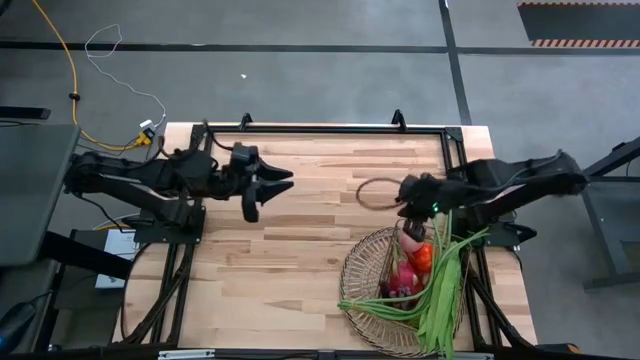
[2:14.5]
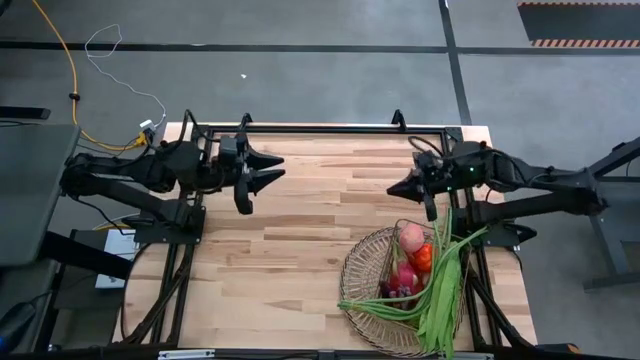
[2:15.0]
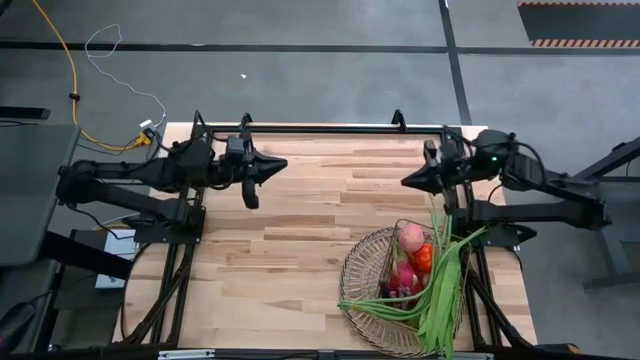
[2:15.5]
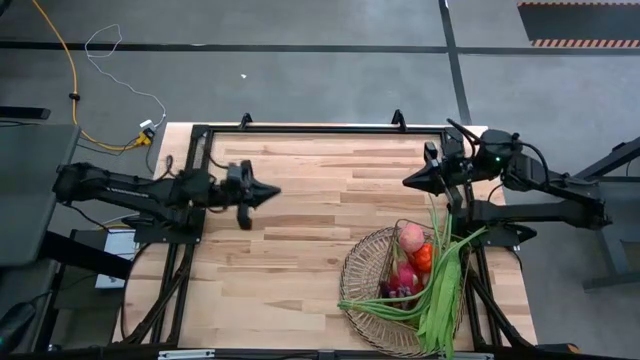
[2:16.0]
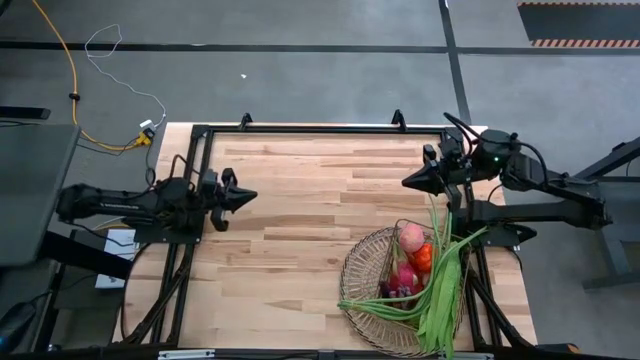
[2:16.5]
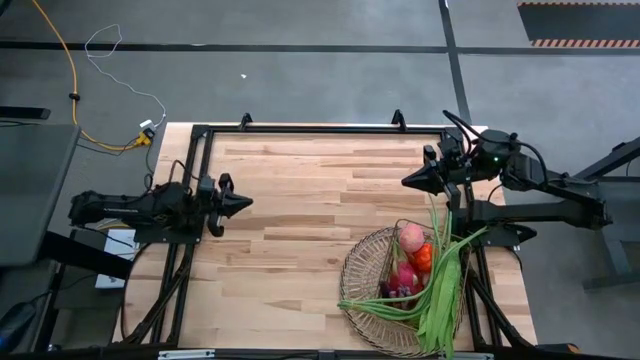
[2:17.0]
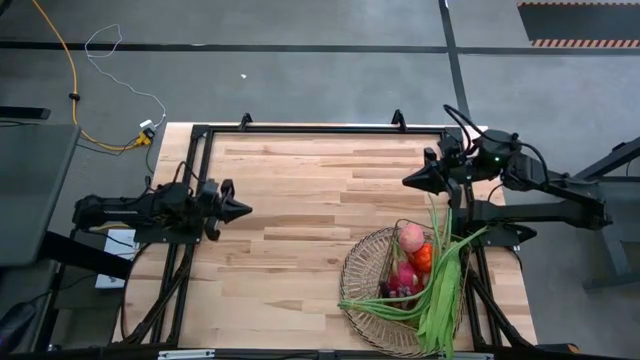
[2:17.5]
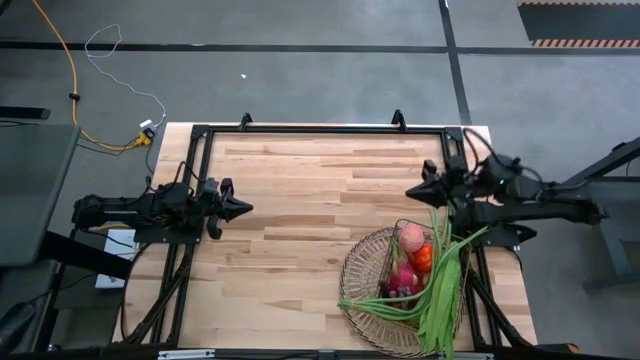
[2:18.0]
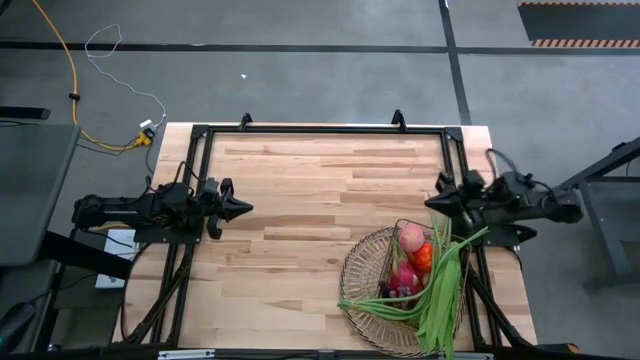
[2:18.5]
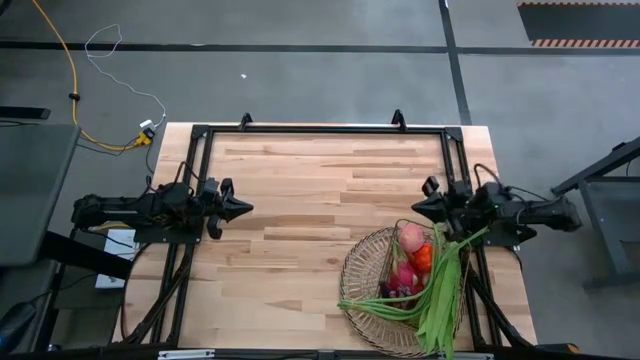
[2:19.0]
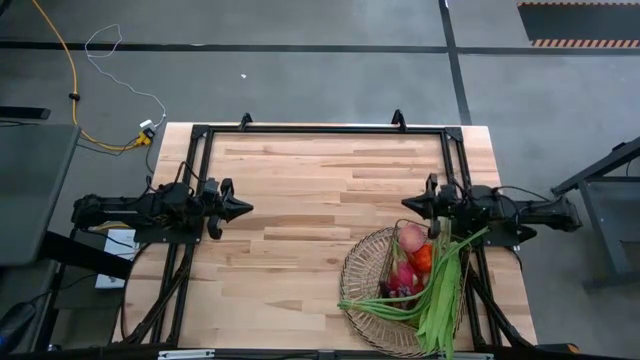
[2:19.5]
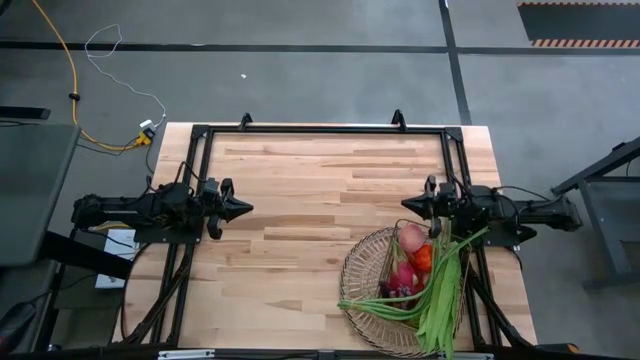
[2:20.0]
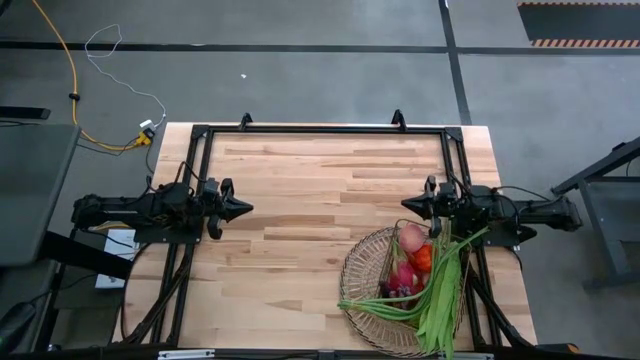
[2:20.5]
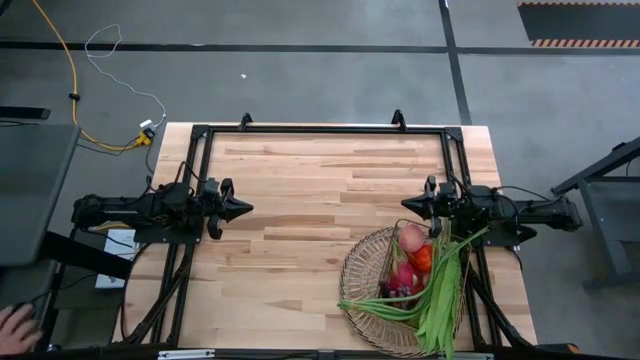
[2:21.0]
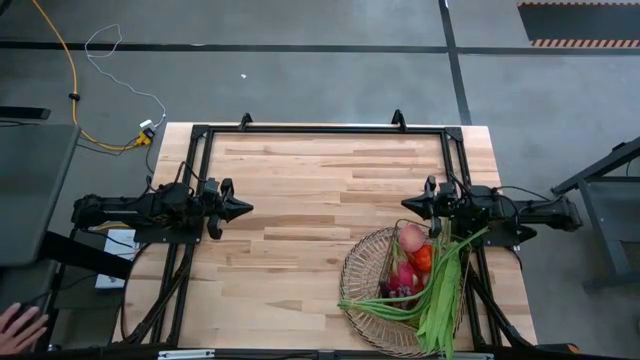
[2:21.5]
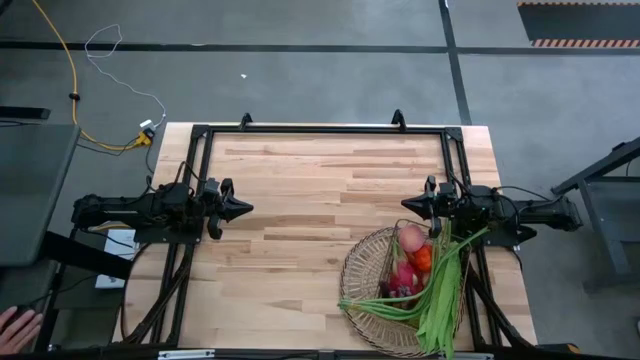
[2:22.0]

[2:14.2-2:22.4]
Task: Build produce basket
Return to Home Position

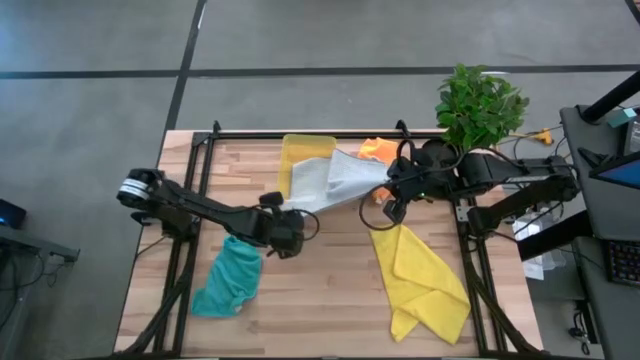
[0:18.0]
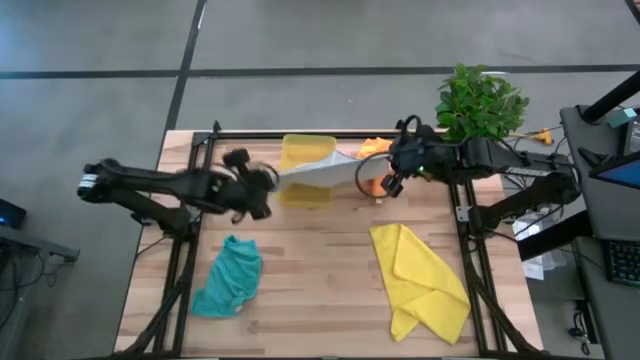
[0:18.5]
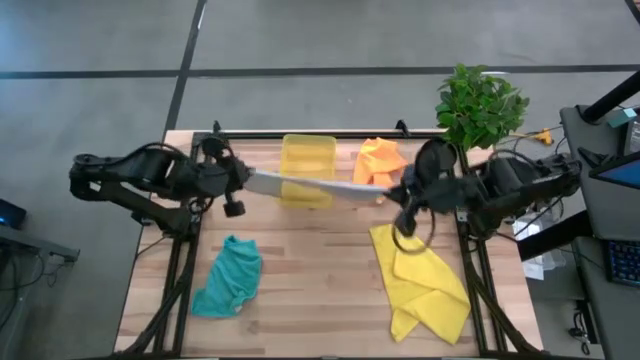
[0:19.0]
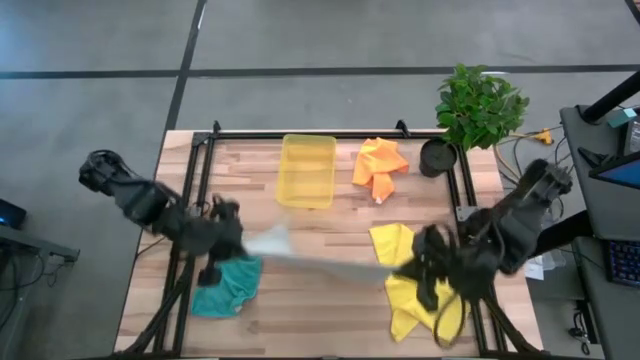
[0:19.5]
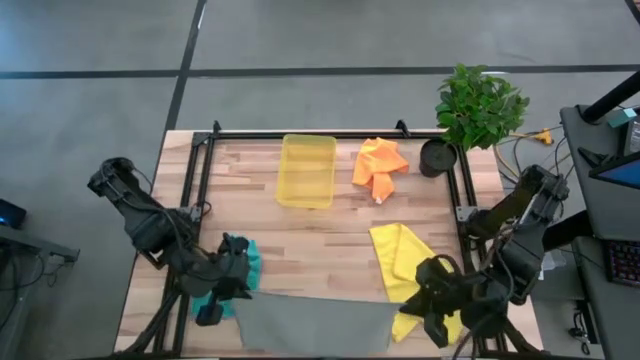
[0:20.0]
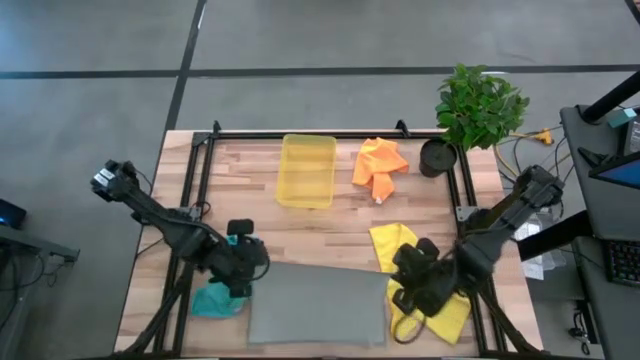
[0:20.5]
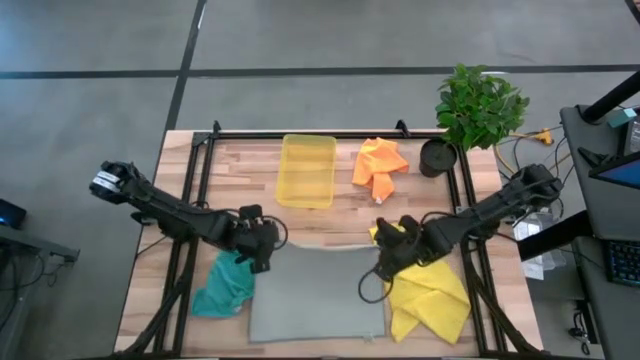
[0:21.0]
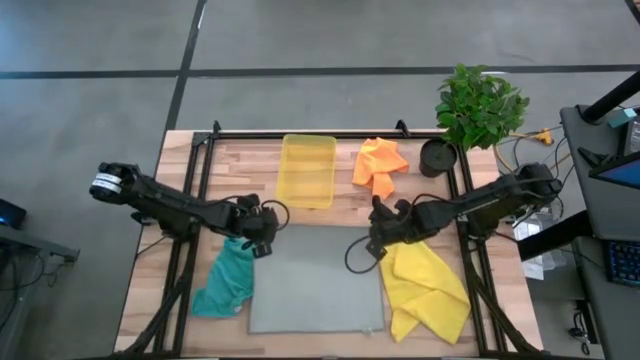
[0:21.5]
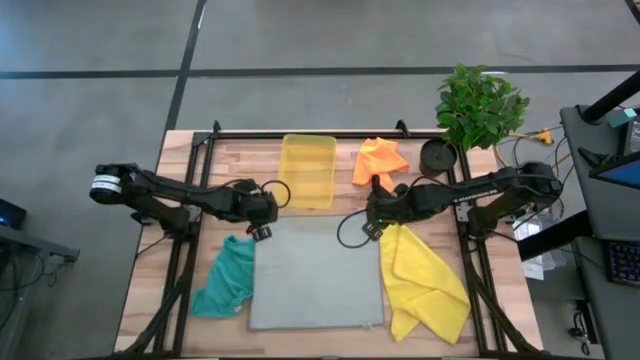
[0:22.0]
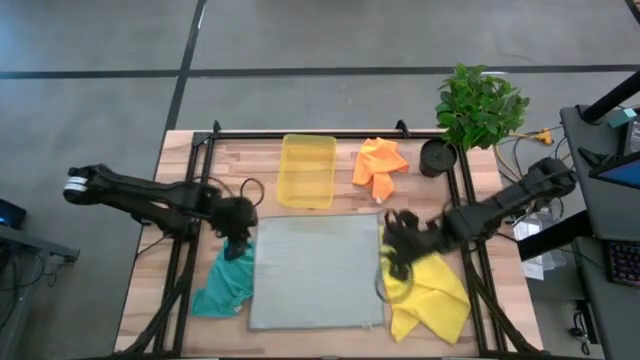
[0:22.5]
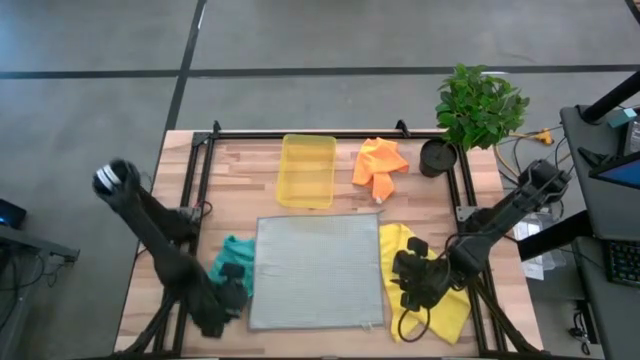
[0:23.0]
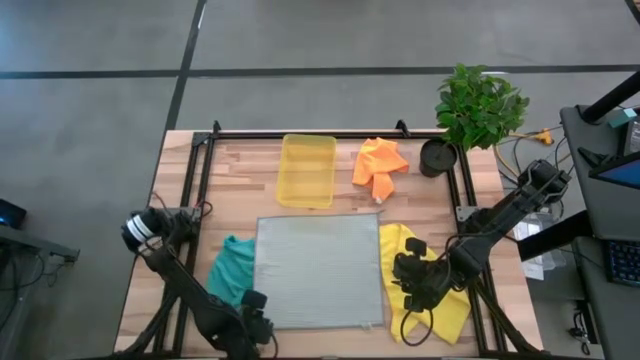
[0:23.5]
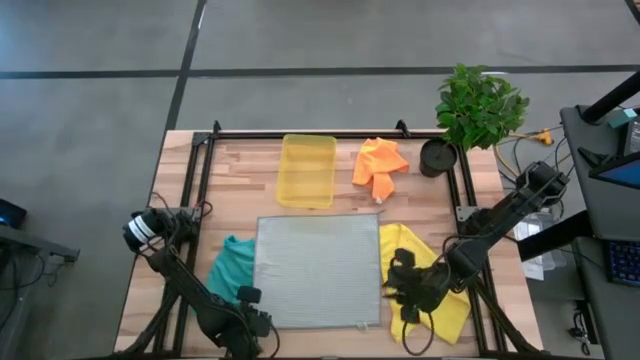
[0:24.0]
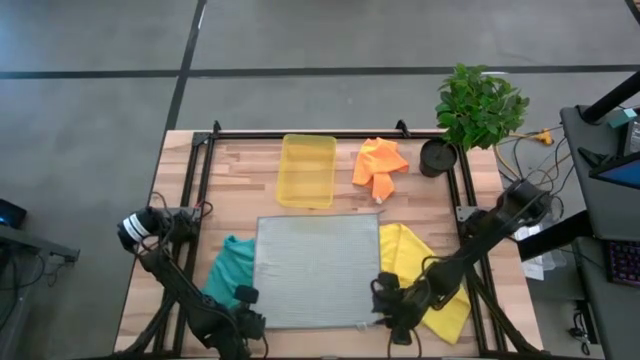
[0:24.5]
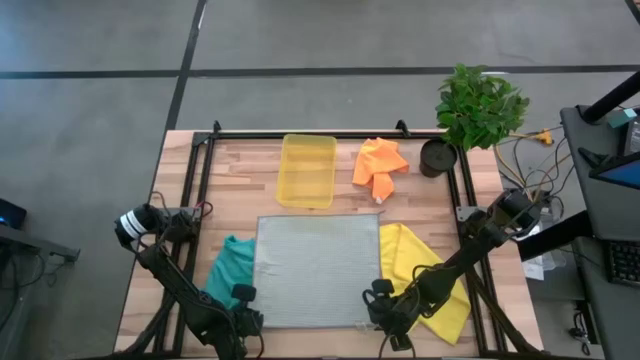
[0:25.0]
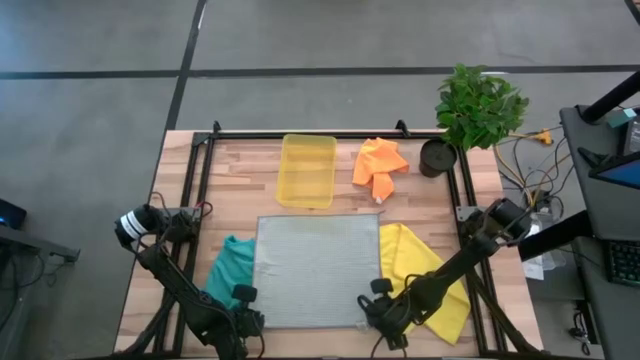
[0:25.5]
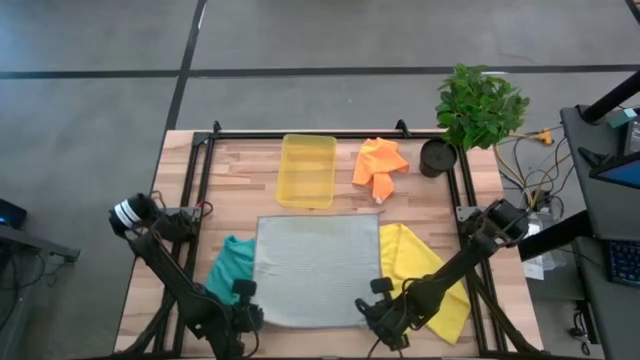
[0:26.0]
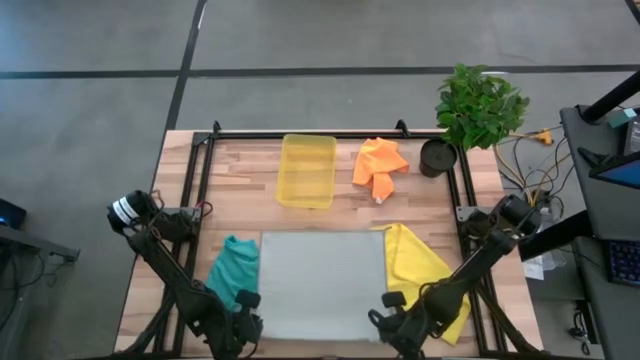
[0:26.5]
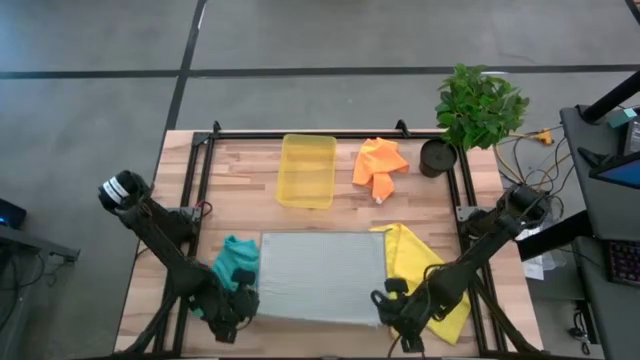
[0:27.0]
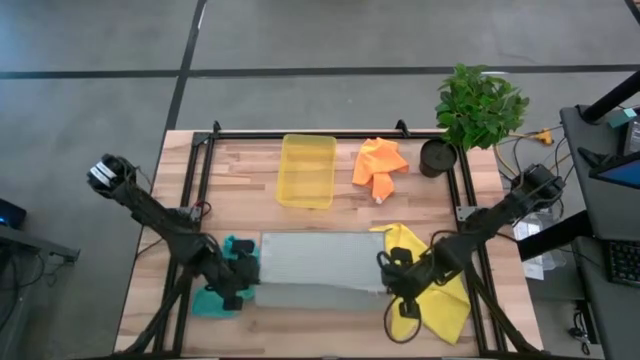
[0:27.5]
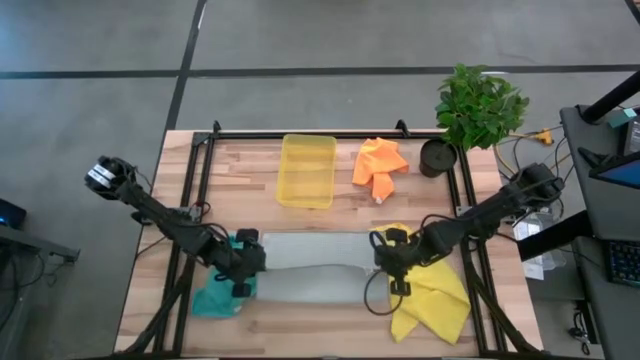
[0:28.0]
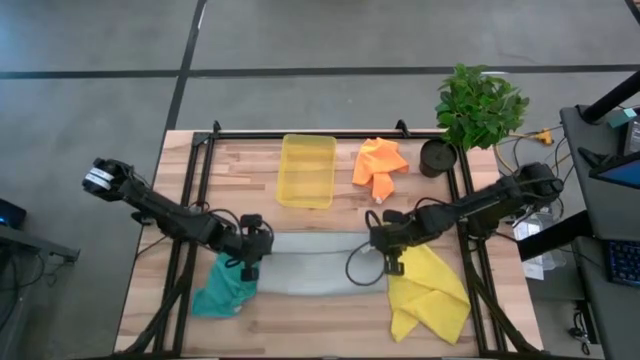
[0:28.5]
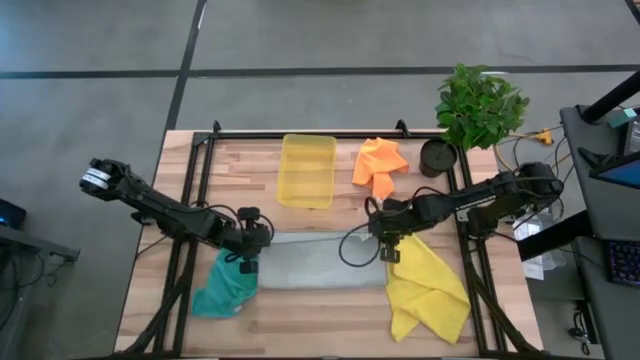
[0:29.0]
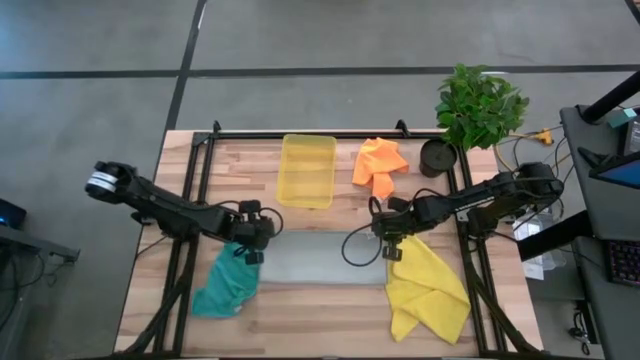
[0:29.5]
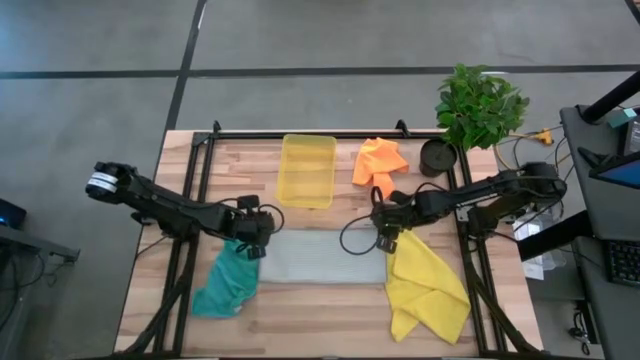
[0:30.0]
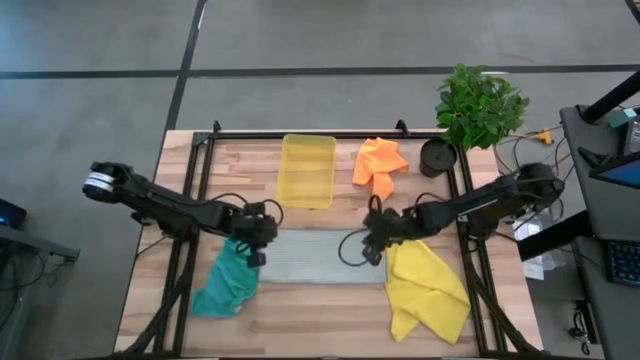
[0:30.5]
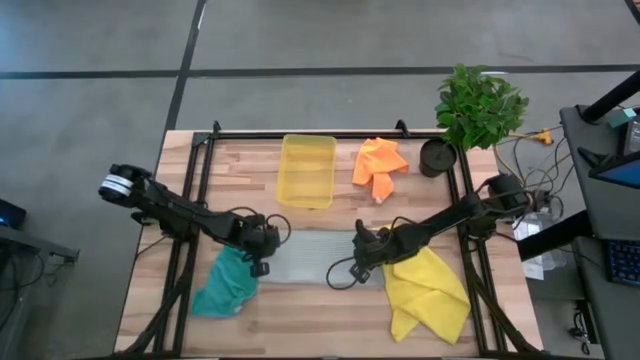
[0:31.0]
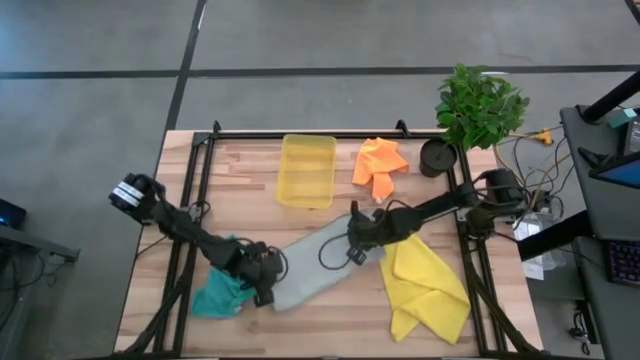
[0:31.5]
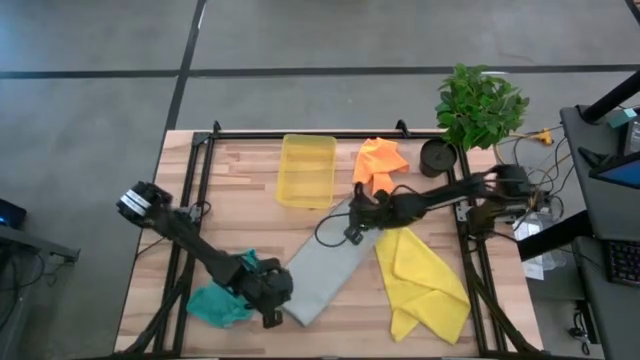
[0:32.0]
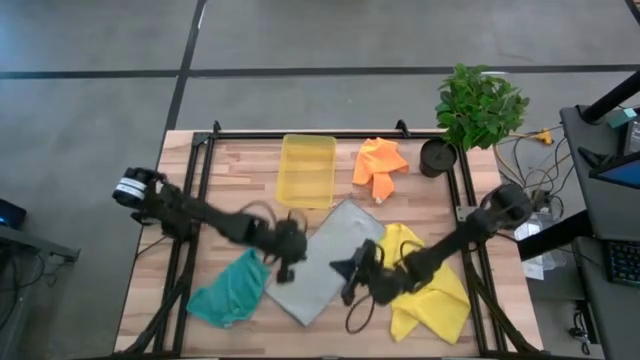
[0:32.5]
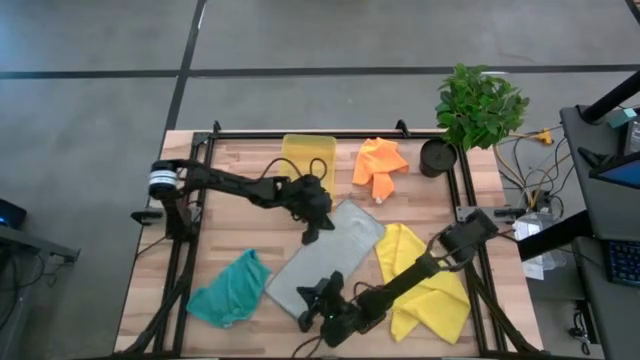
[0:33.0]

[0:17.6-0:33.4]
Task: Fold microfiber towels
Fold the gray microfiber cloth
